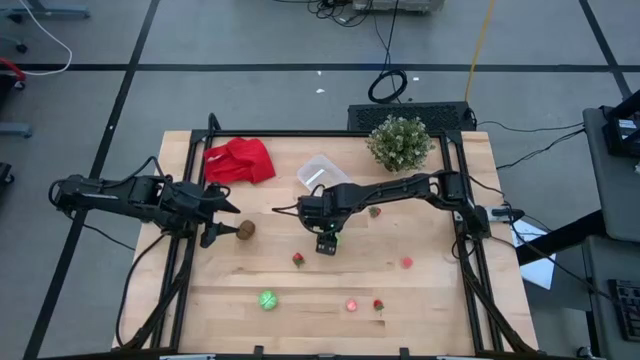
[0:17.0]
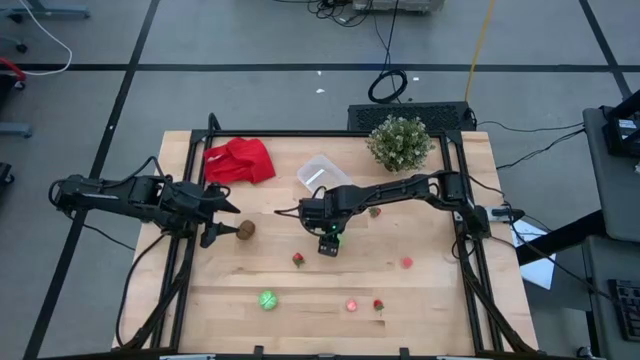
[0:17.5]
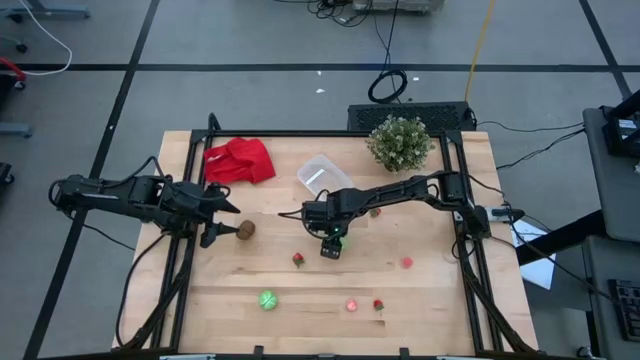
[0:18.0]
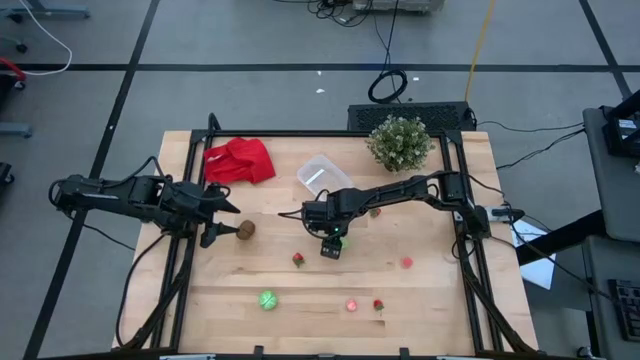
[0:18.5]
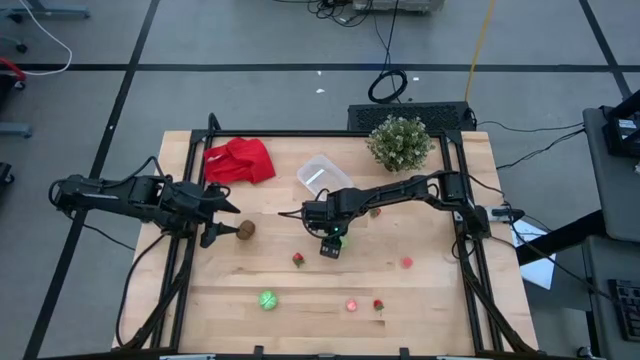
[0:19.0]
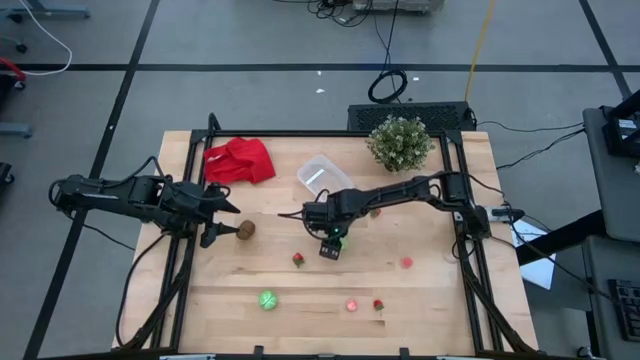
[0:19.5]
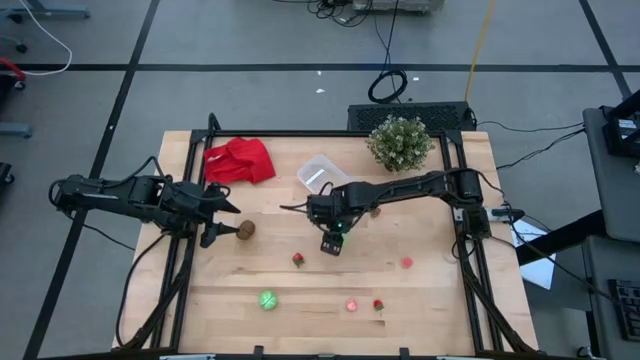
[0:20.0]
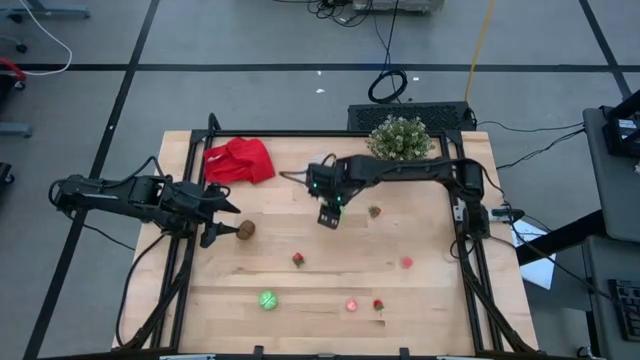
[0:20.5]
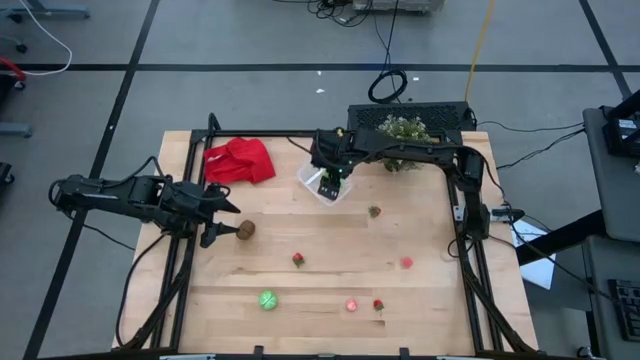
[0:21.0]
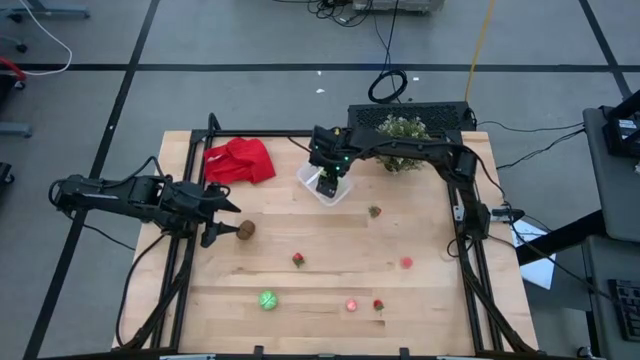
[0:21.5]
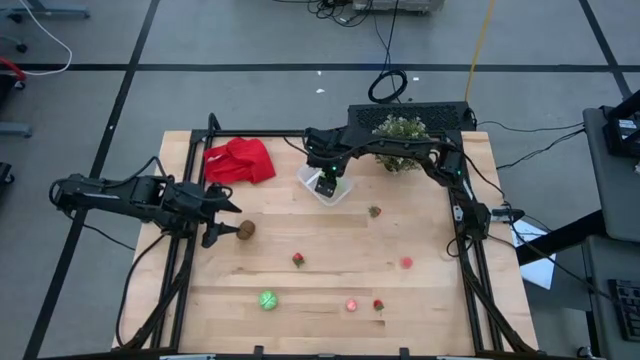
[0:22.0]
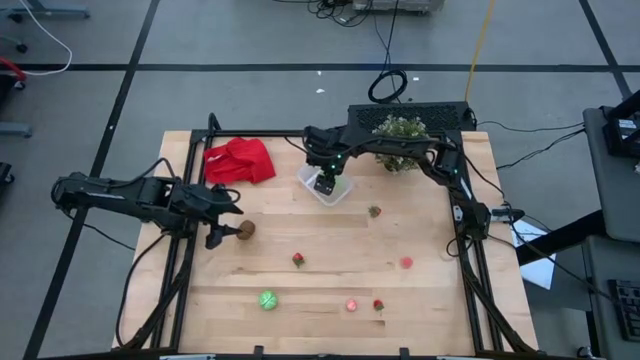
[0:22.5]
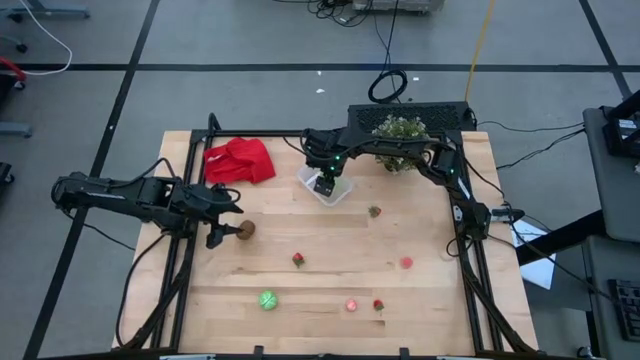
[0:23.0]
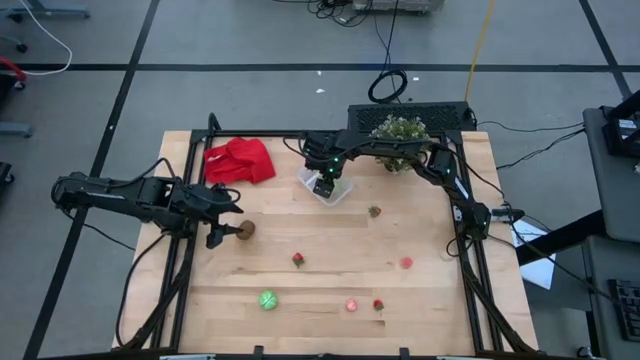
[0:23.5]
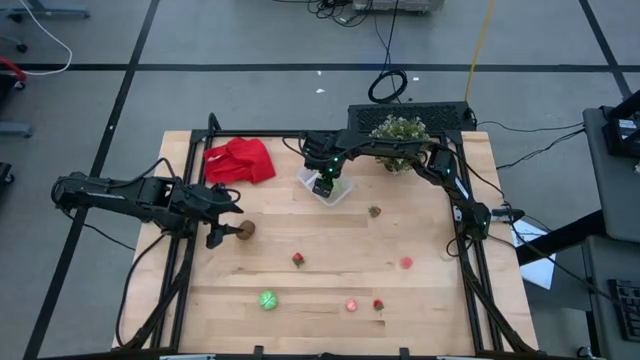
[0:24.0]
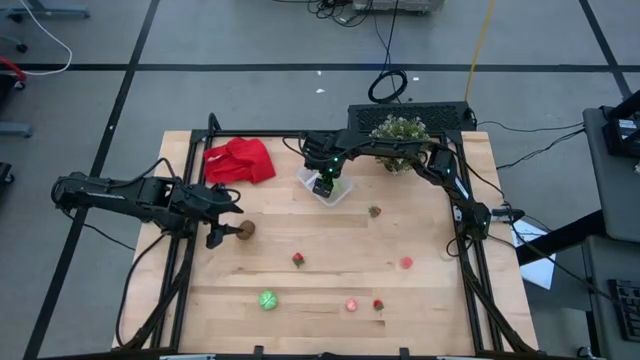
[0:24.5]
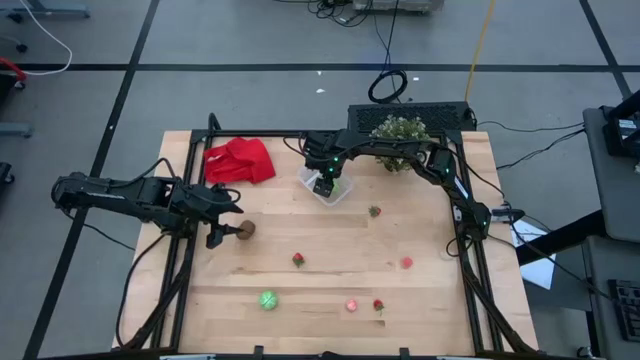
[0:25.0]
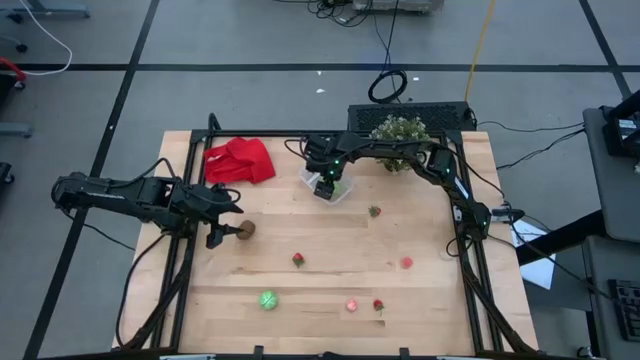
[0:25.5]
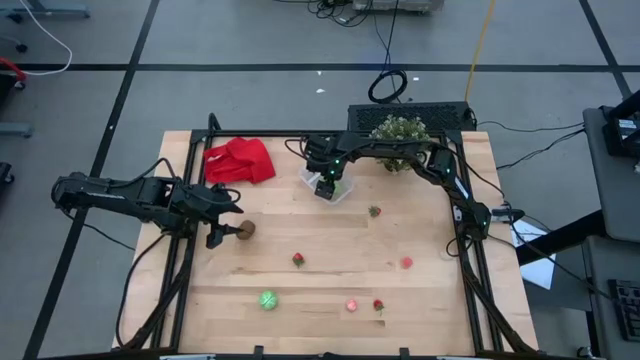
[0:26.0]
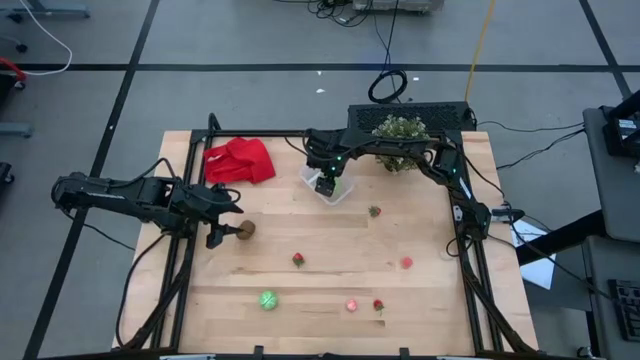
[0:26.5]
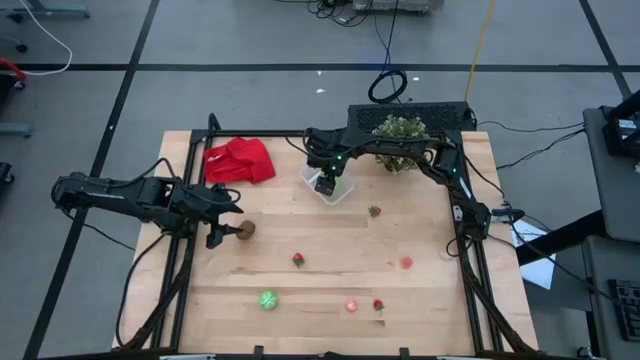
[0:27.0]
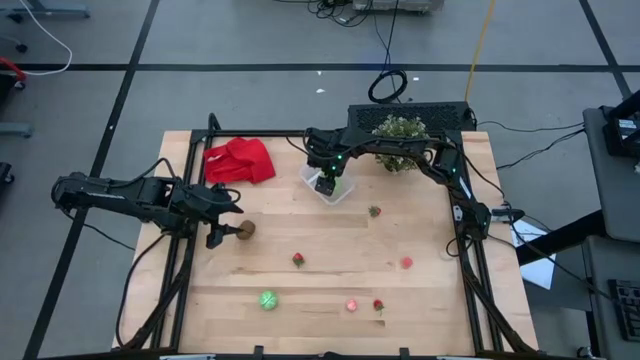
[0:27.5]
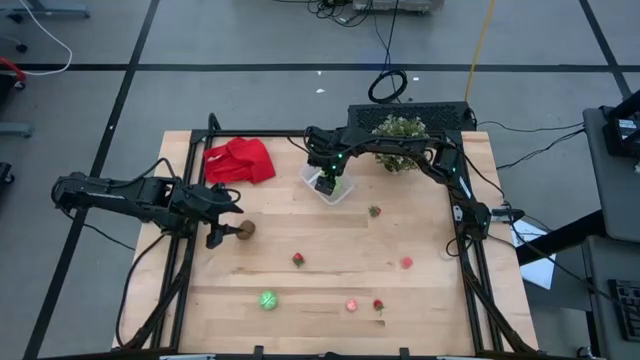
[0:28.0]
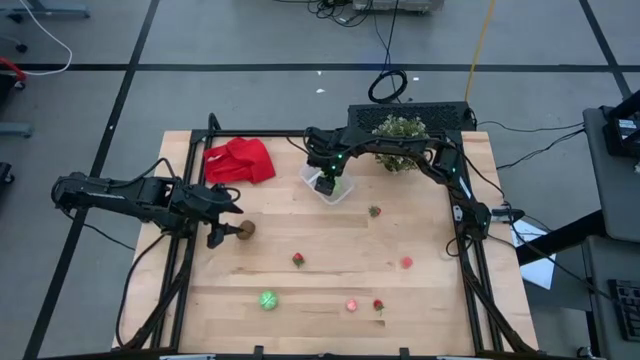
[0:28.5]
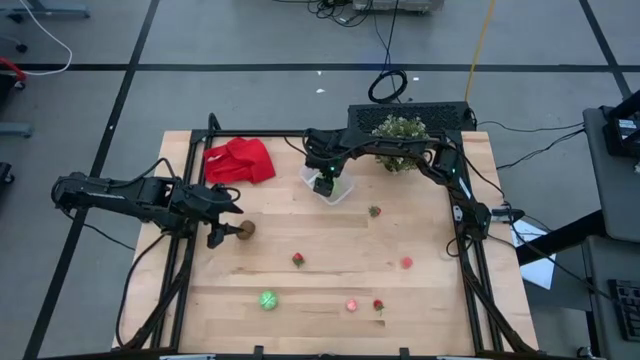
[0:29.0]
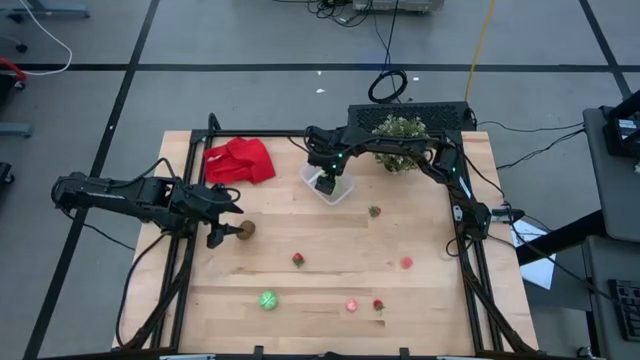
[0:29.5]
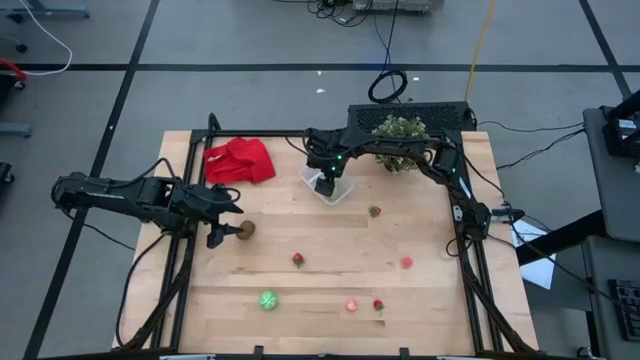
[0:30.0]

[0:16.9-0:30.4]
Task: Pick and placing Produce into tupperware
Put the green starfruit into the transparent bin

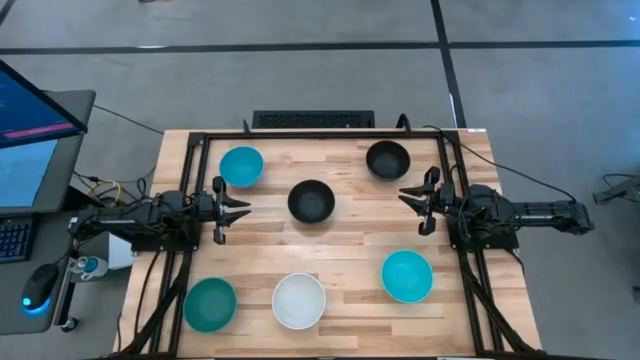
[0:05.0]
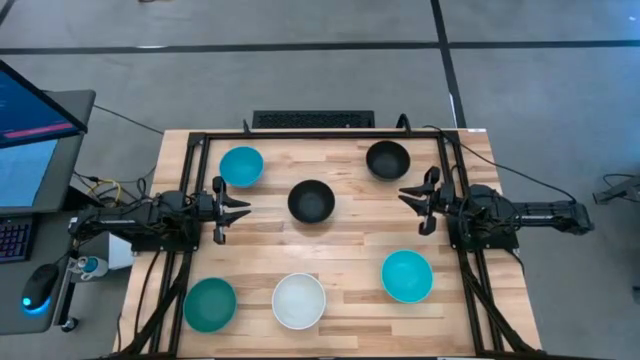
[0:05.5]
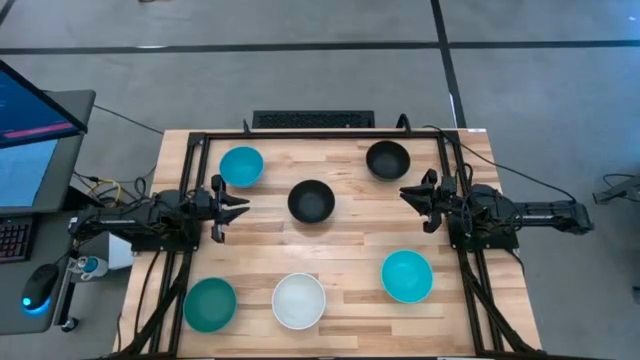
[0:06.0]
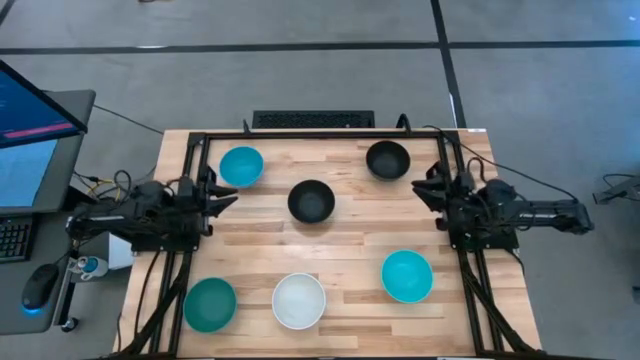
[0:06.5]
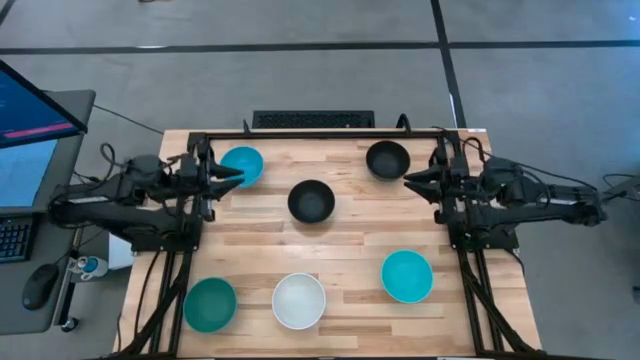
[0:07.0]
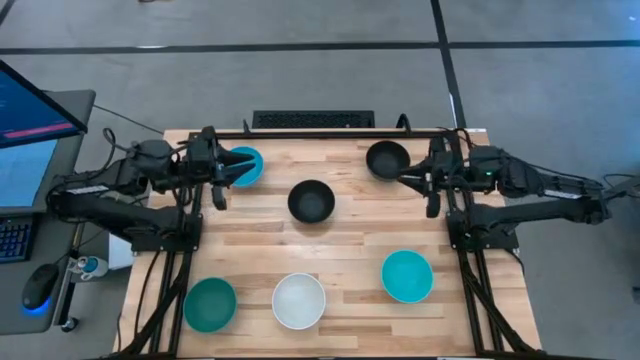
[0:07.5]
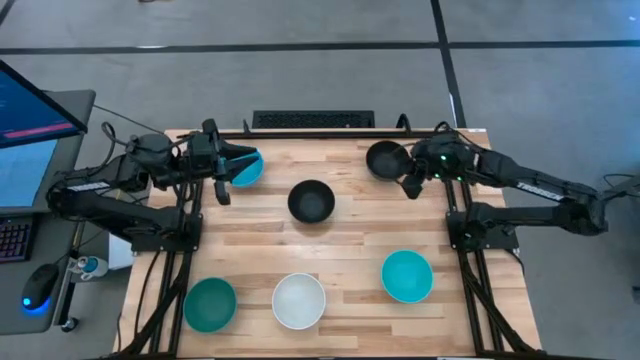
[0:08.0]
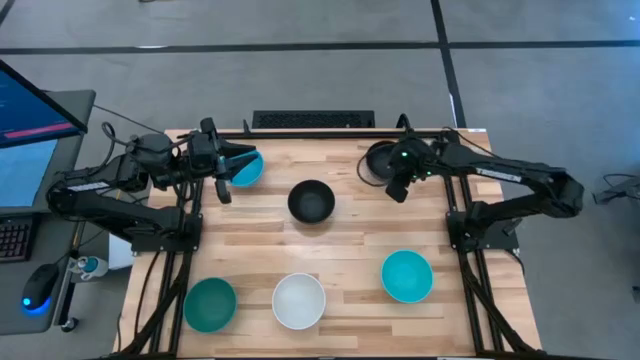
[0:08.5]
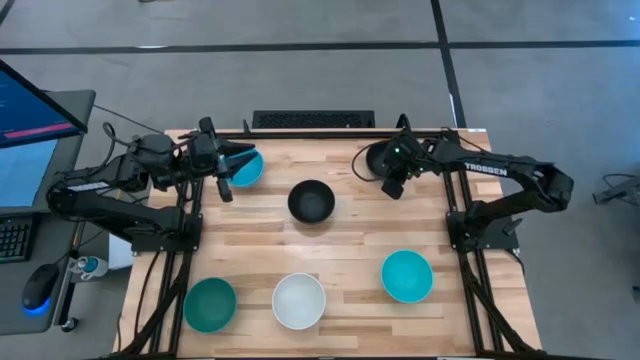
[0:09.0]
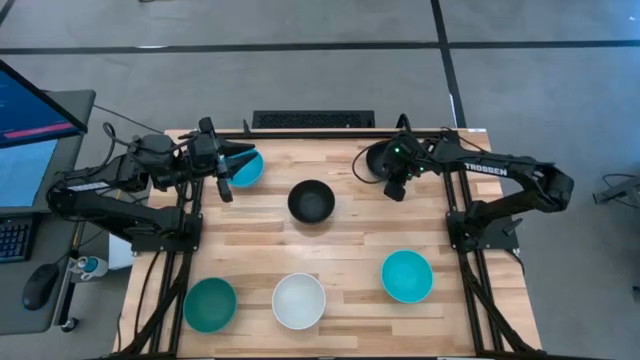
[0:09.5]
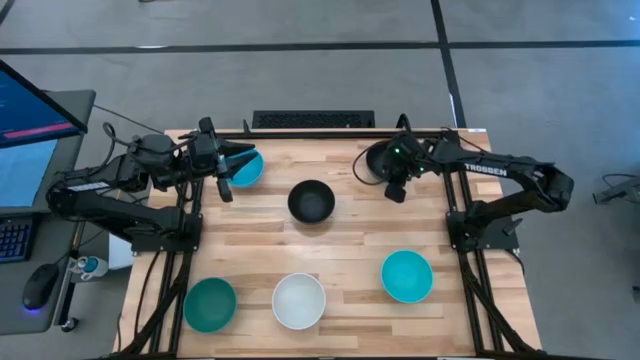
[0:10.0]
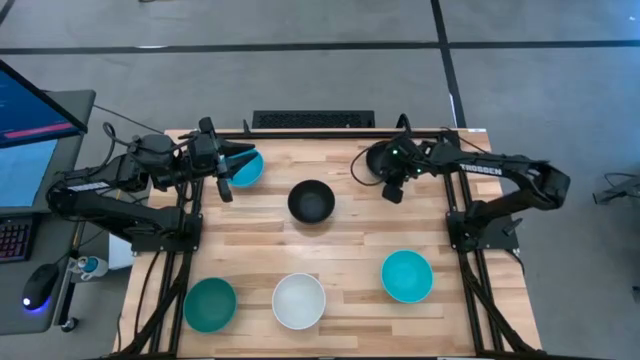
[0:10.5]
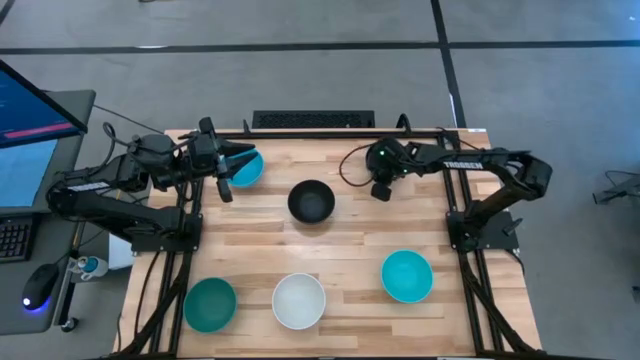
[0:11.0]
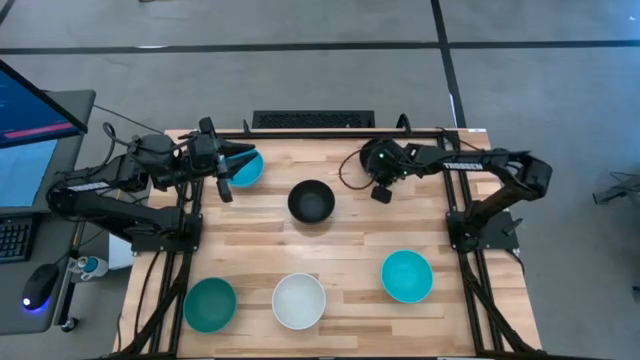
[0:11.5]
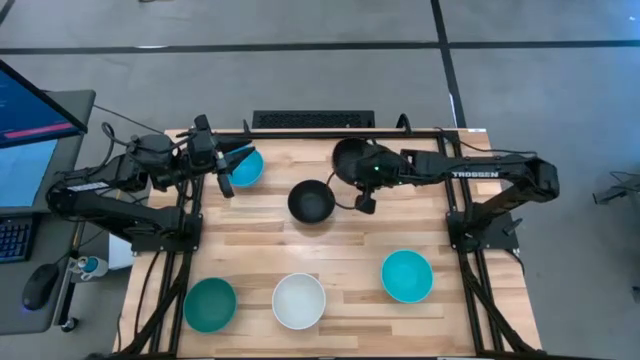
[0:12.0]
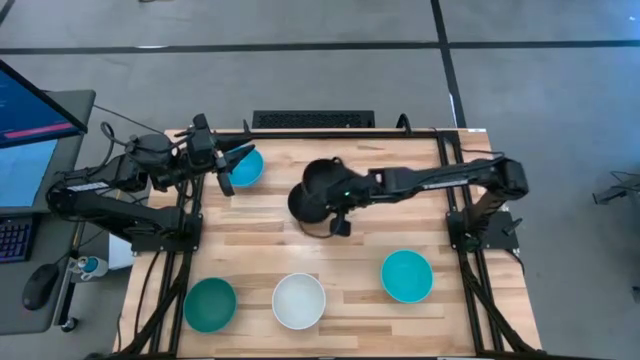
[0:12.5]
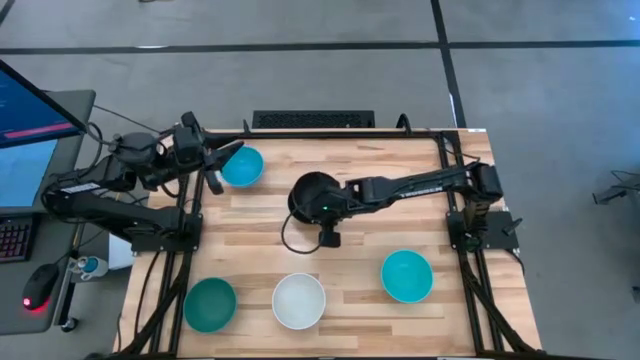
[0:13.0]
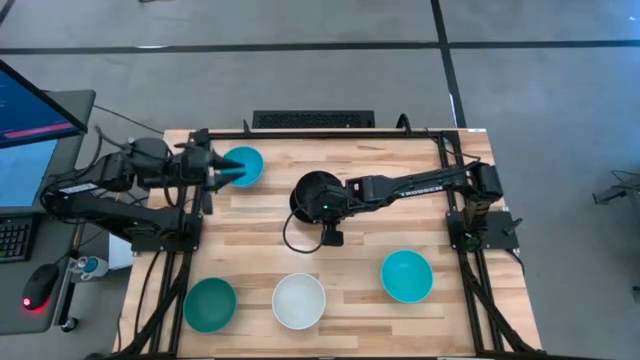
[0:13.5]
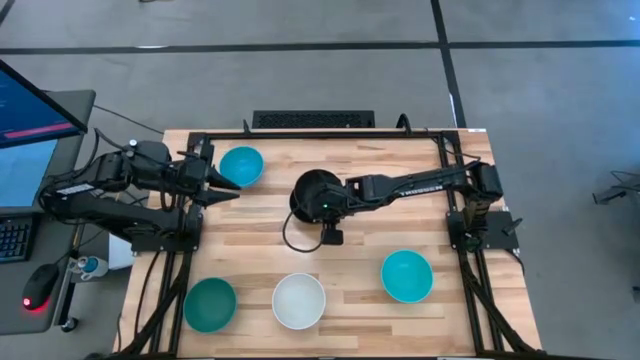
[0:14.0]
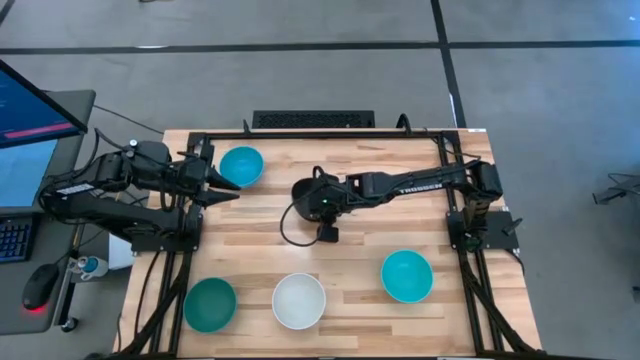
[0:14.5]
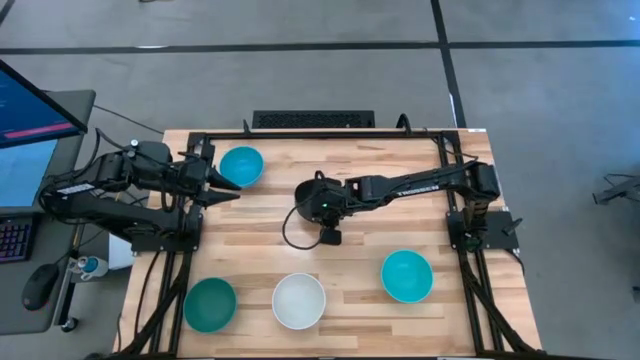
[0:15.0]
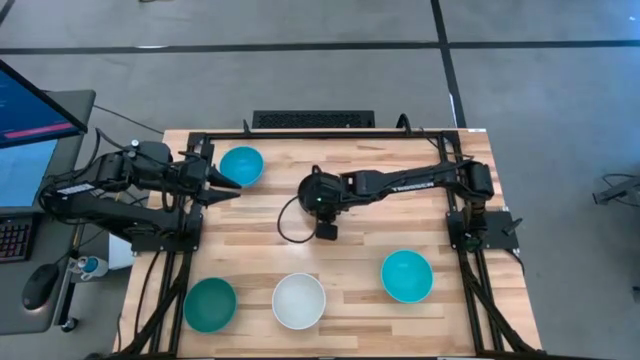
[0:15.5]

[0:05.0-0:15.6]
Task: Nest bowls inside each other
Stack the top black bowl on top of the bottom black bowl
